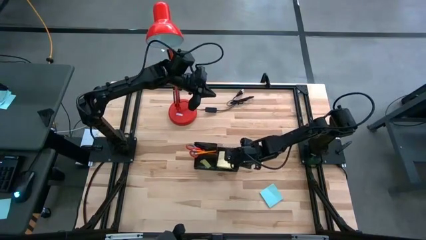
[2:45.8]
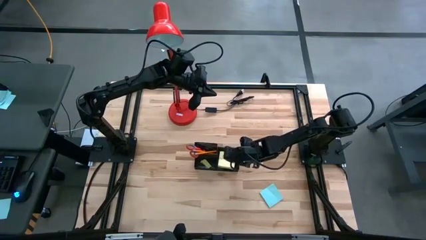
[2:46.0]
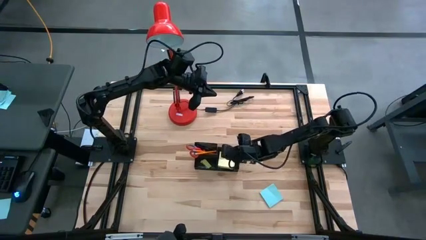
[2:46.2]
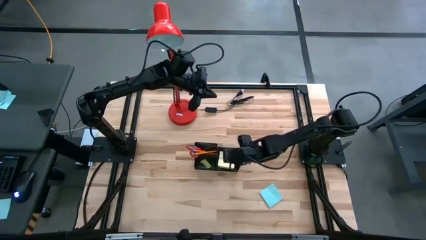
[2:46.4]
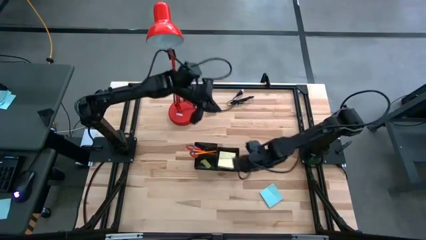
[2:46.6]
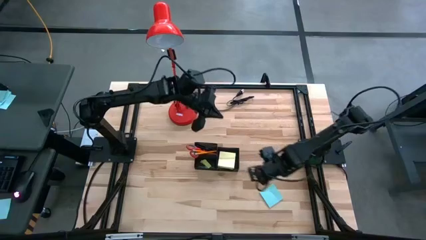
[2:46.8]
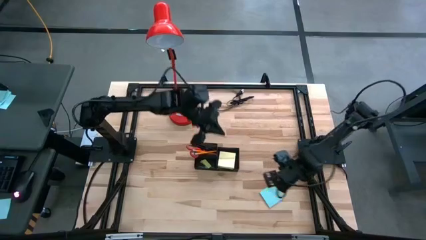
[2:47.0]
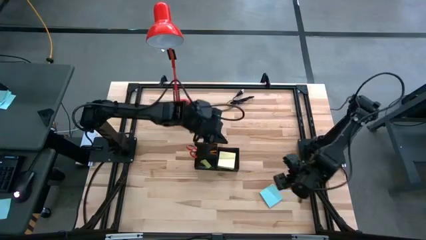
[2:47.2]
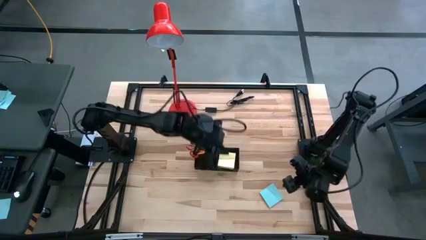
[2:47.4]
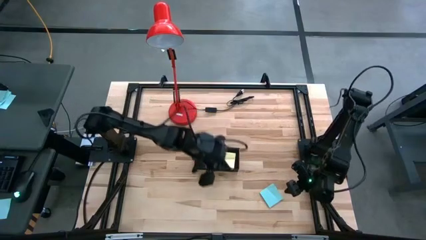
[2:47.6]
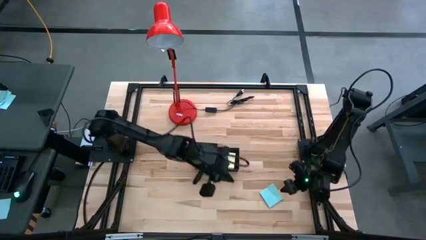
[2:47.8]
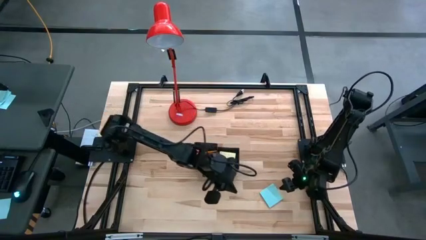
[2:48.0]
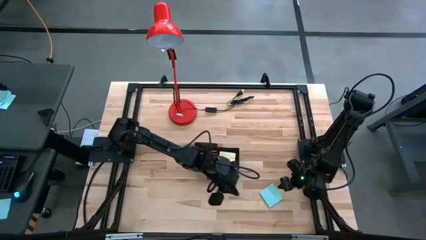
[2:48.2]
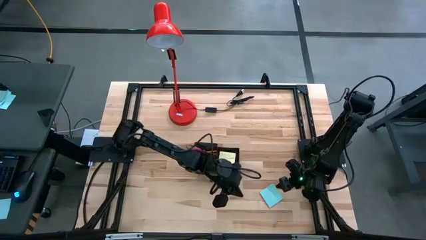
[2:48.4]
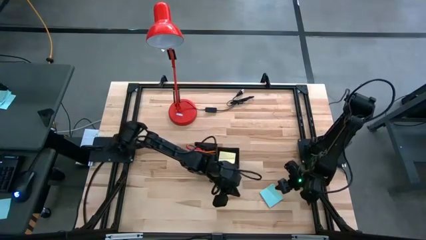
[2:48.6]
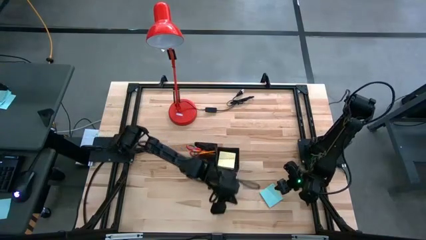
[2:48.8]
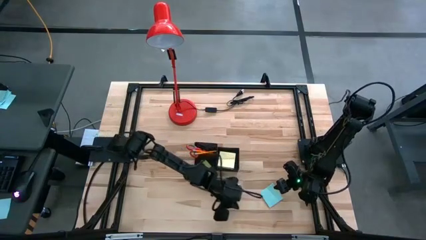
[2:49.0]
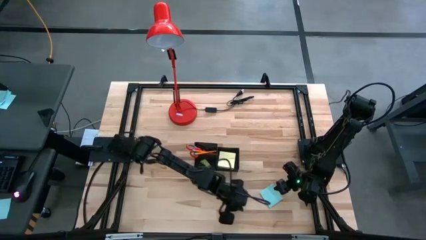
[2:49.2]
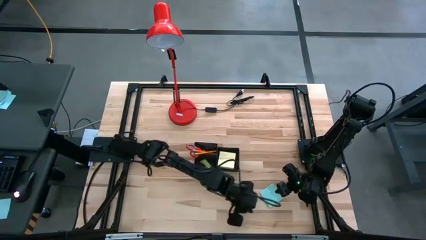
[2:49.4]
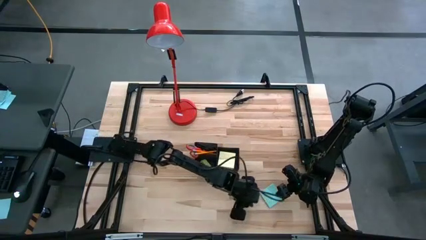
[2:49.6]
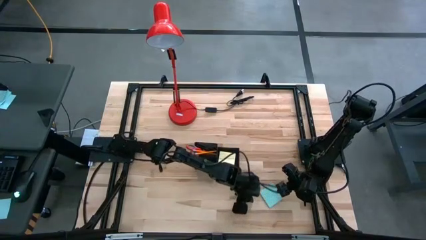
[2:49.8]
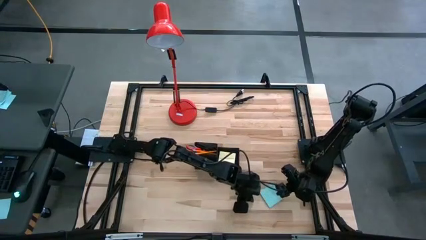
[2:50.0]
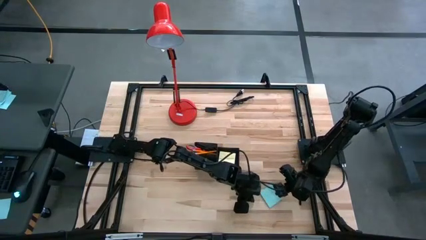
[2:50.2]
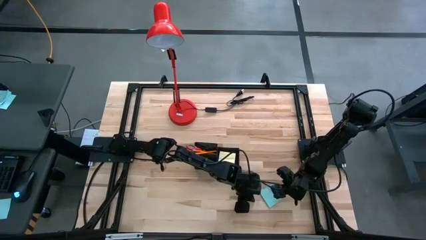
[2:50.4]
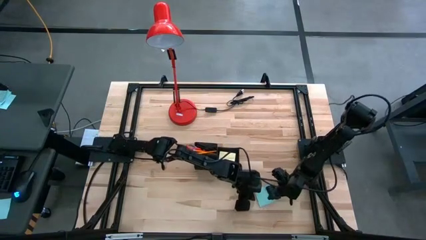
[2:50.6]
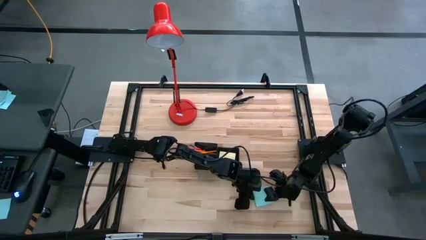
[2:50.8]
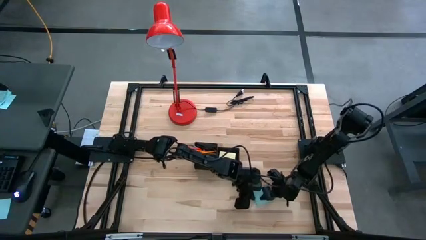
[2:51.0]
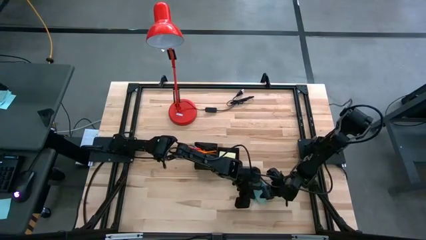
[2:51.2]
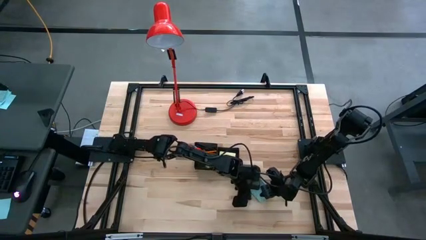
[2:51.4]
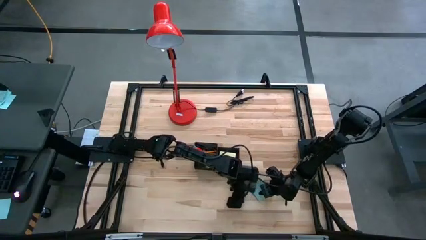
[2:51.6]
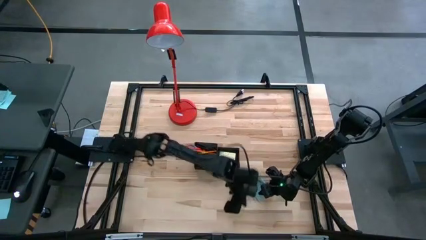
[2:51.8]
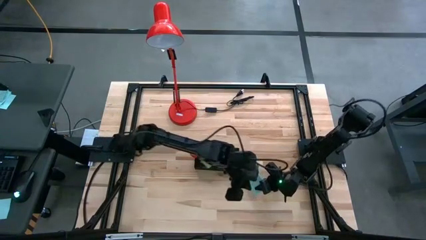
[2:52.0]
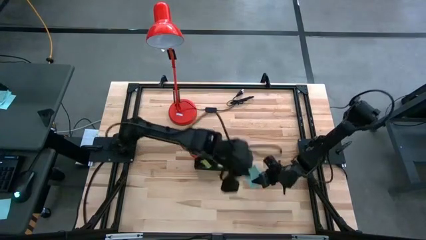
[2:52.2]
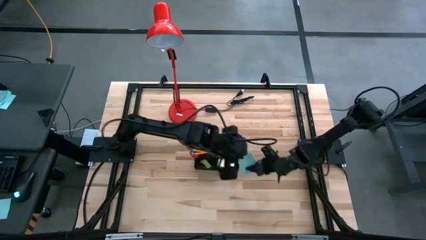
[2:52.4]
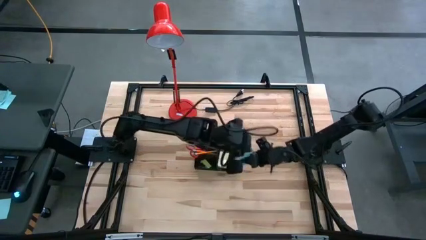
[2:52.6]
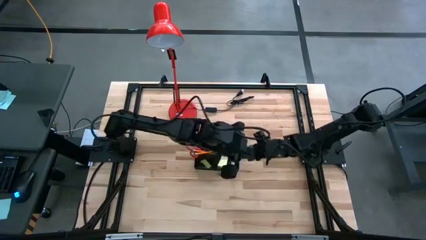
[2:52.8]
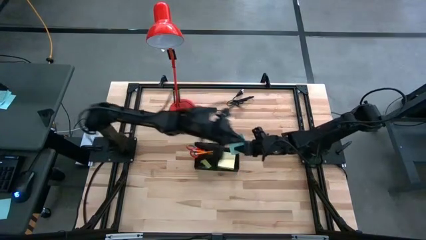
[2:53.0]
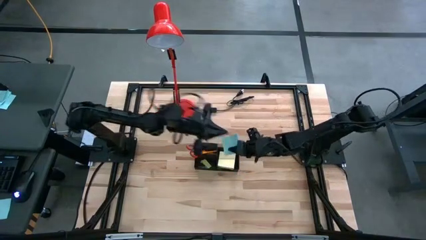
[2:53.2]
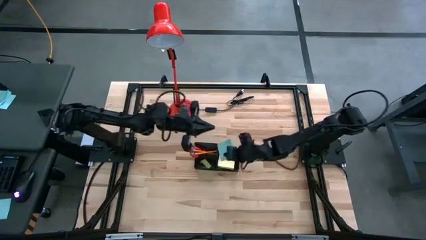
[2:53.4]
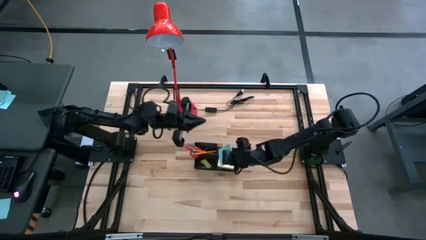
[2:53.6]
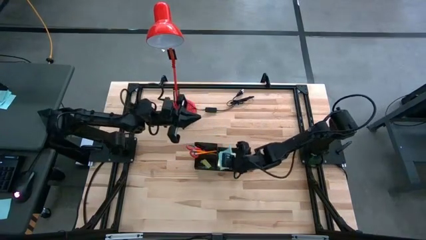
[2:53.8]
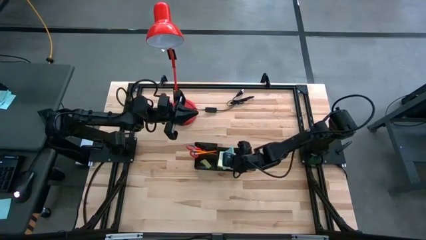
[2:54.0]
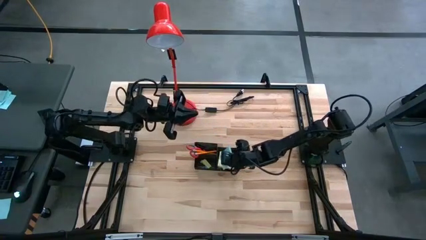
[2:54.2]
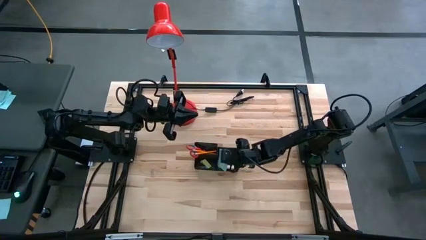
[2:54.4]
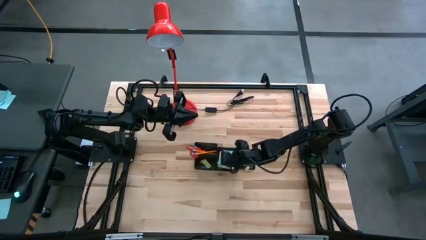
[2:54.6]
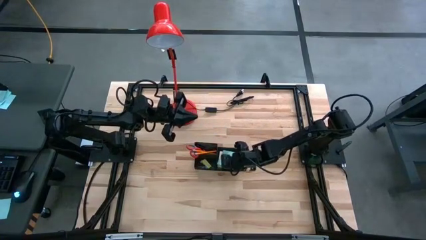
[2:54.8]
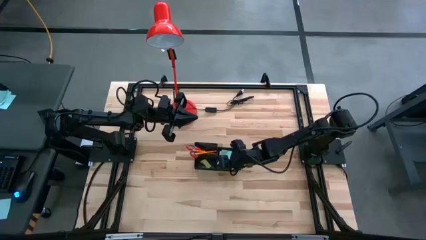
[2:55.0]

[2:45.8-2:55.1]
Task: Pick and place office supplies into organizer
Put the light blue sticky notes into the black desk organizer

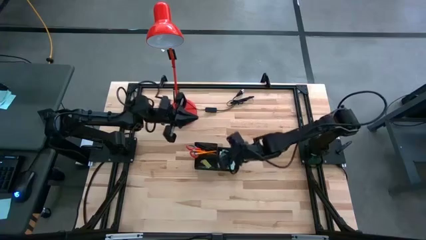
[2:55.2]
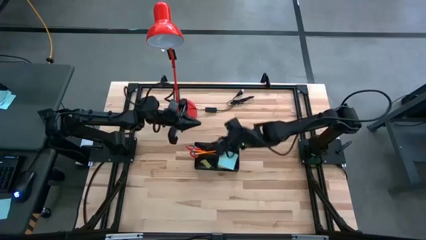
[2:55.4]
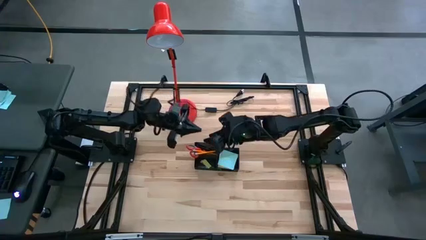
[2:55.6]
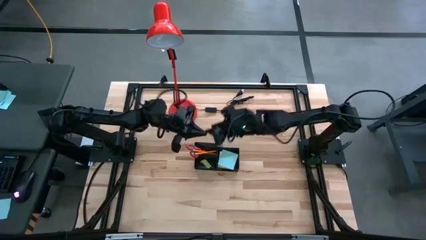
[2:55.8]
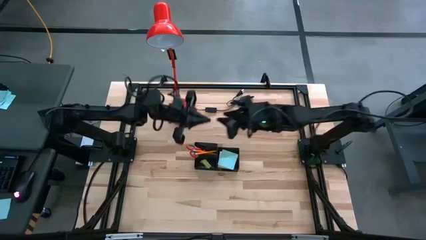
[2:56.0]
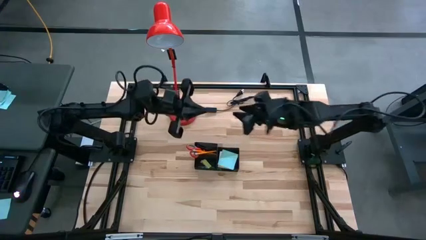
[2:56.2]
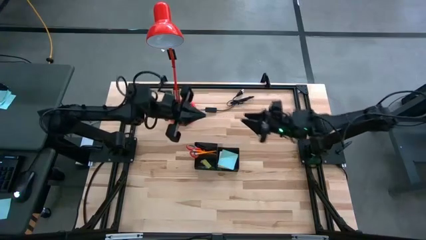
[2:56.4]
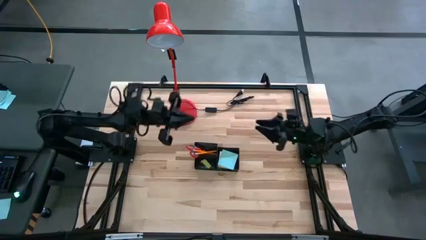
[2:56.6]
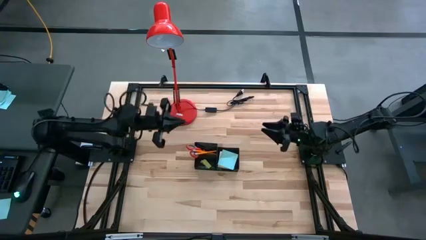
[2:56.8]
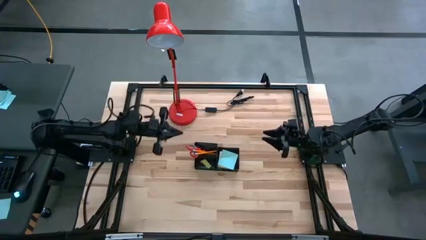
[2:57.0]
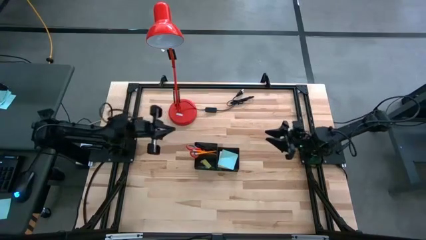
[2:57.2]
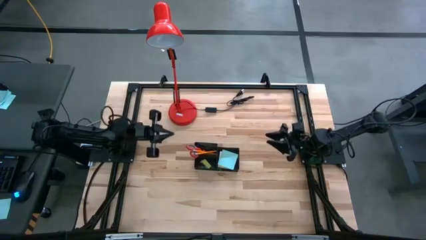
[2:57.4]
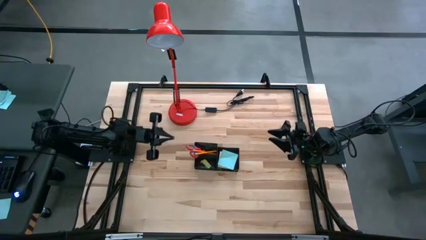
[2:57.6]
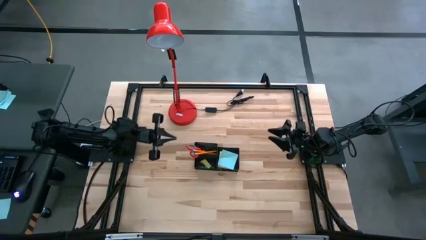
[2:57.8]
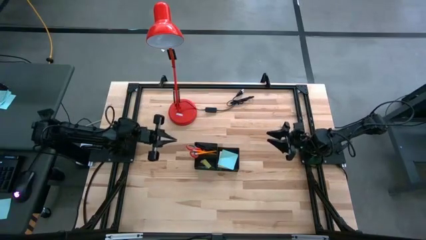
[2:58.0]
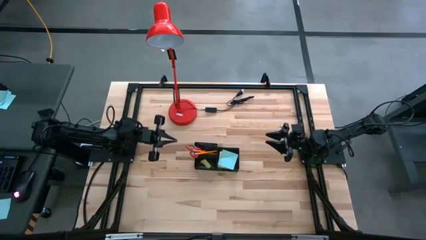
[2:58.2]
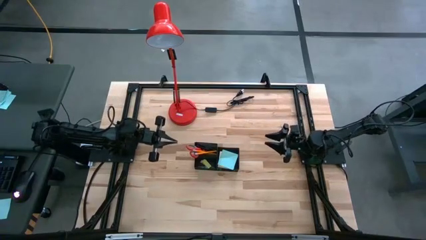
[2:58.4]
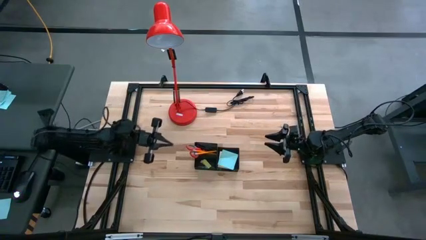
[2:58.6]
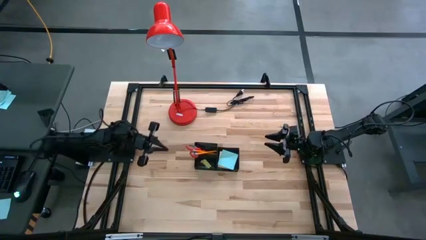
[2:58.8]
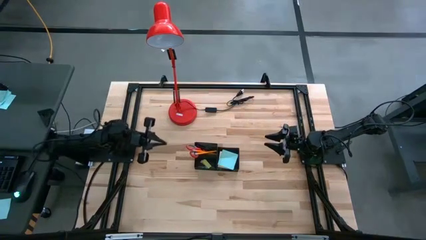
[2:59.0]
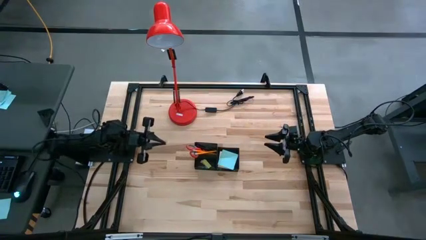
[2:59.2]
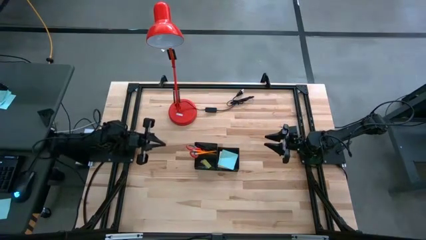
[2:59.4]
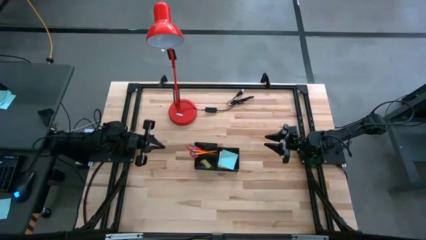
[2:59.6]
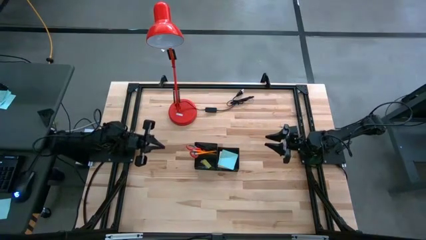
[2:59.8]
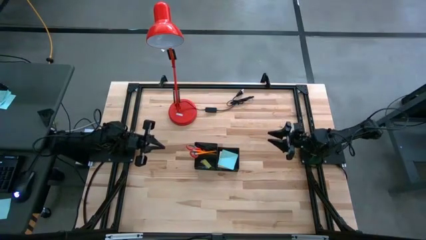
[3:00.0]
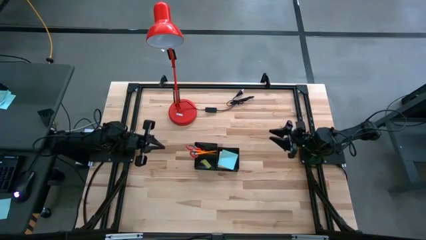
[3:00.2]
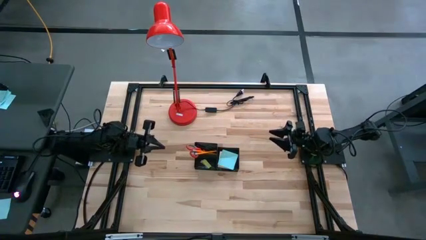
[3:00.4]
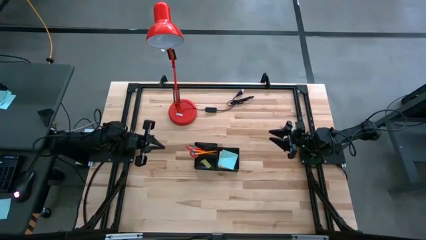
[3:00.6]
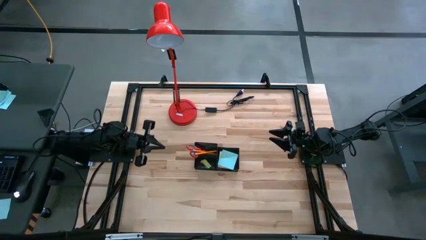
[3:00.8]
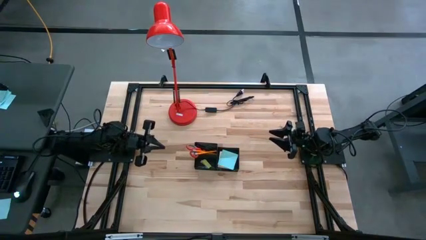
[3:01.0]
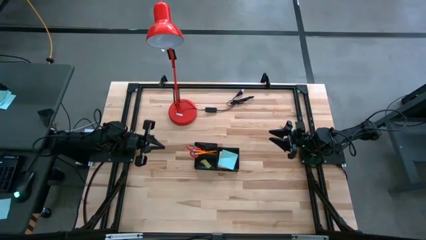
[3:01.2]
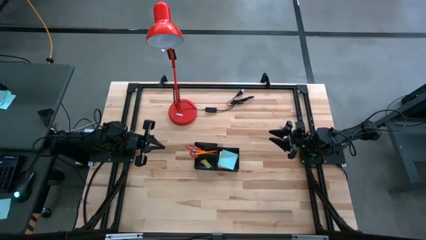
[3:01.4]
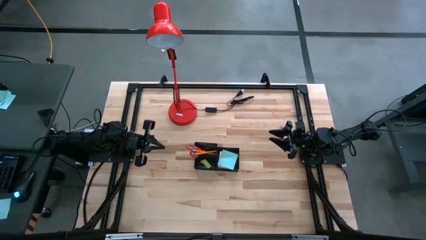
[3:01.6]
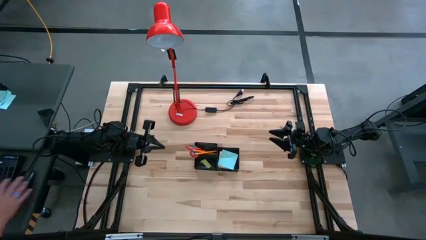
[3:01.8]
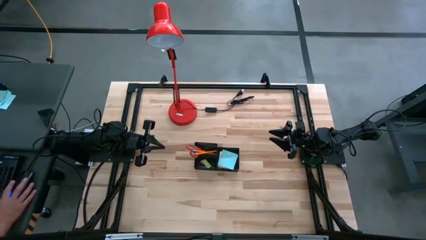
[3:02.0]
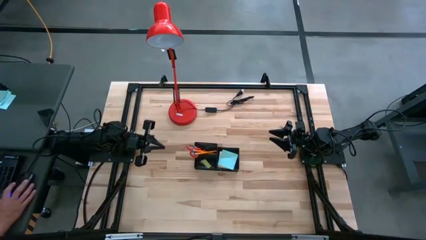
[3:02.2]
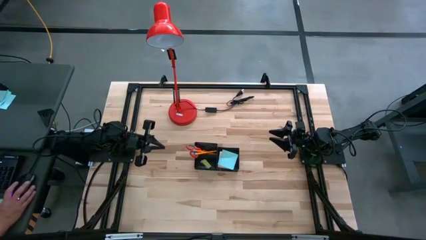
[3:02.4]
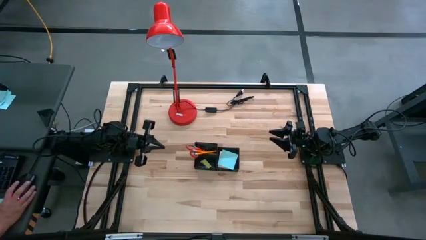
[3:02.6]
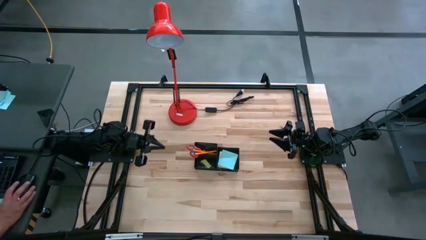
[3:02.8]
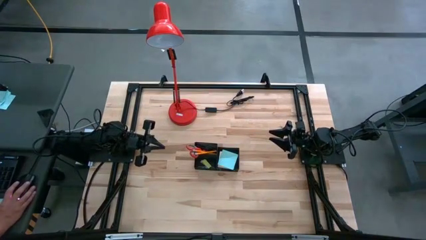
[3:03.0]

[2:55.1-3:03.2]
Return to Home Position
